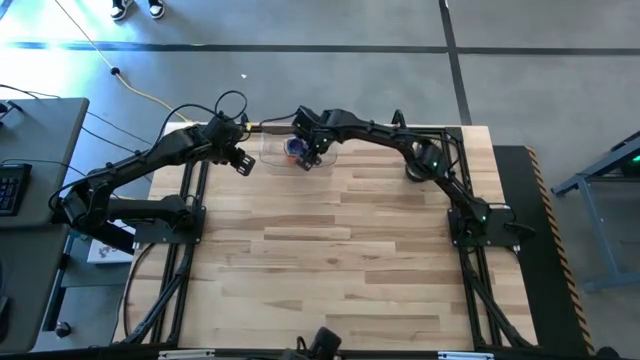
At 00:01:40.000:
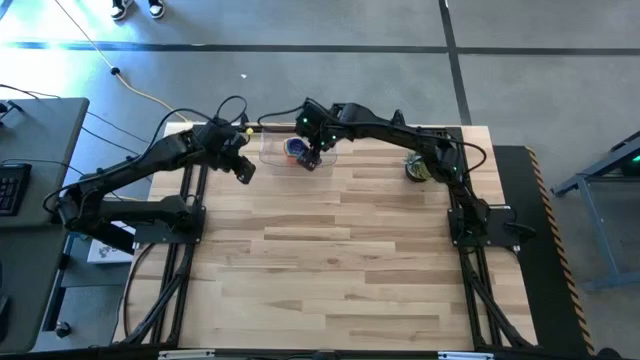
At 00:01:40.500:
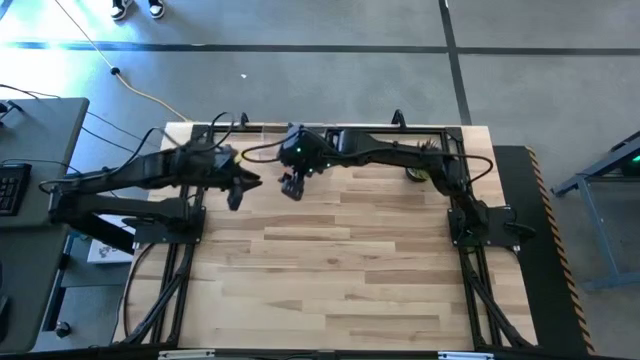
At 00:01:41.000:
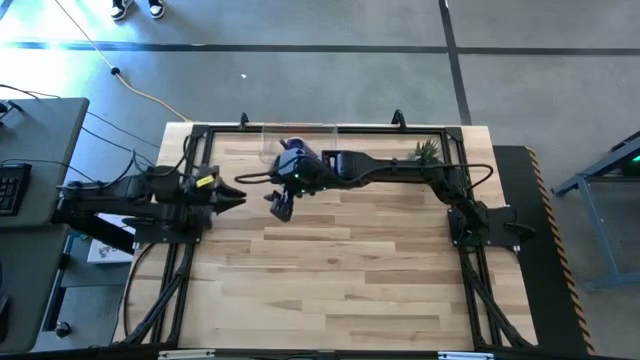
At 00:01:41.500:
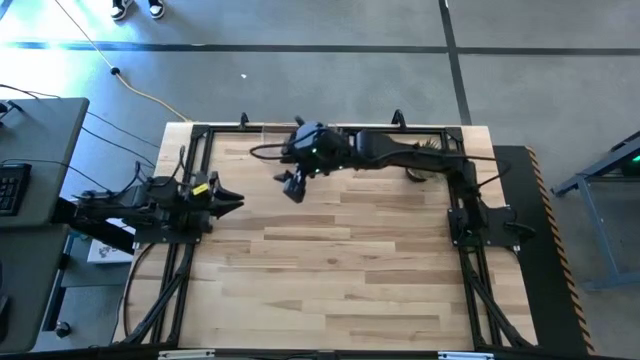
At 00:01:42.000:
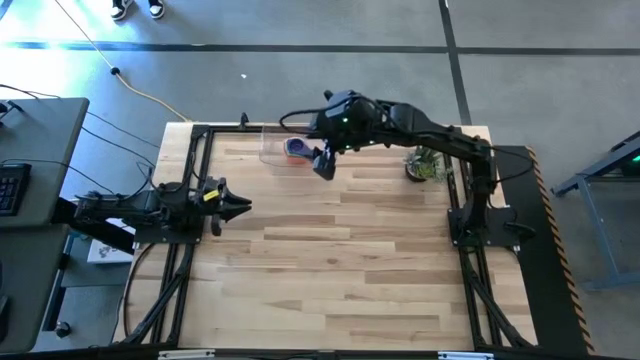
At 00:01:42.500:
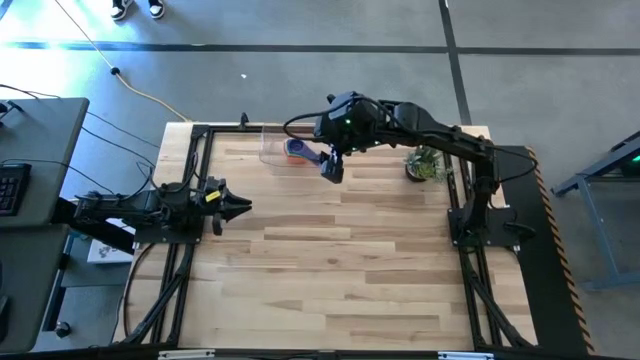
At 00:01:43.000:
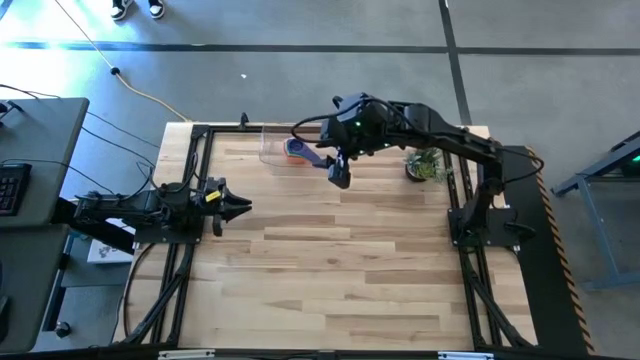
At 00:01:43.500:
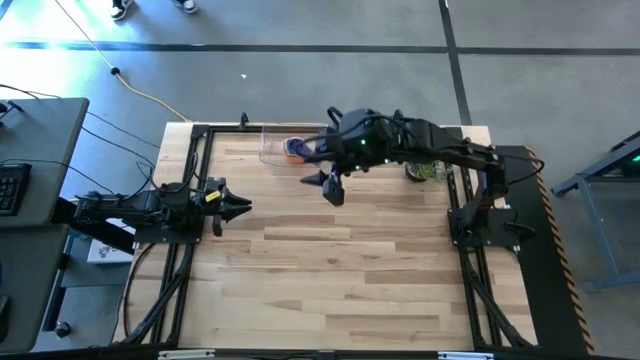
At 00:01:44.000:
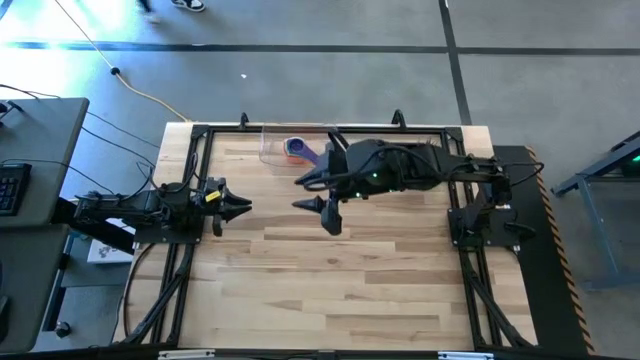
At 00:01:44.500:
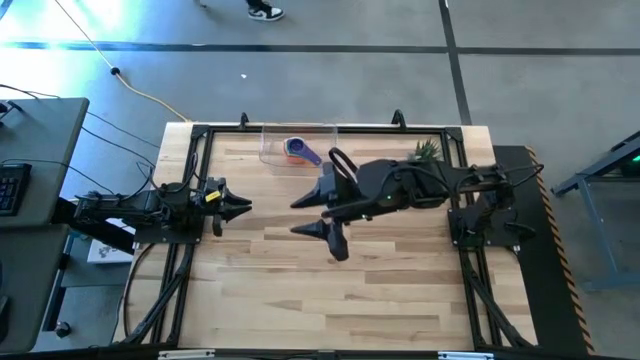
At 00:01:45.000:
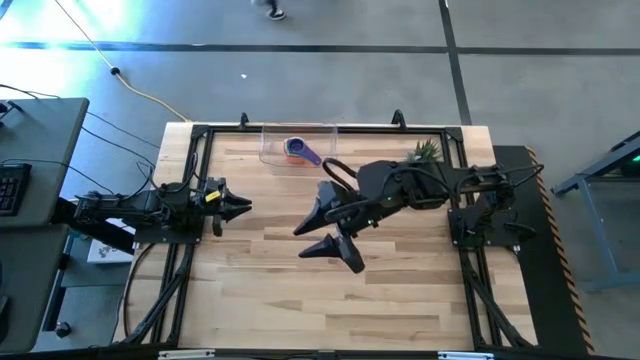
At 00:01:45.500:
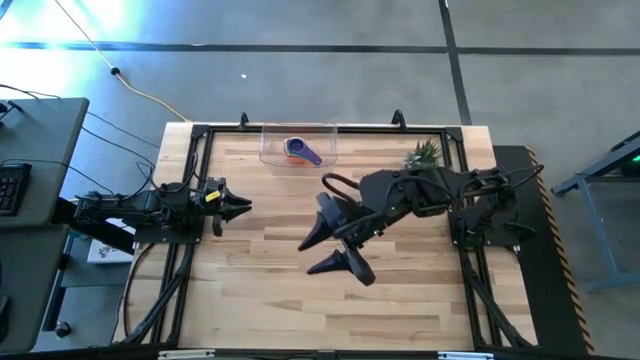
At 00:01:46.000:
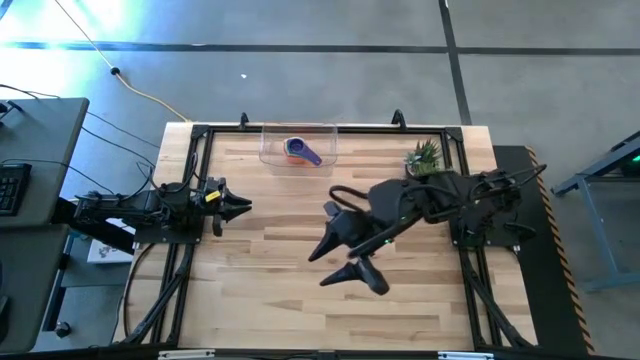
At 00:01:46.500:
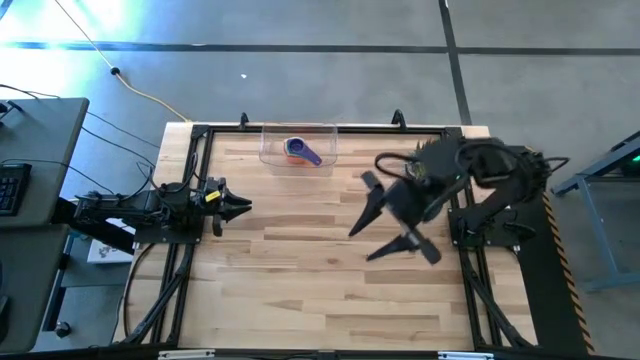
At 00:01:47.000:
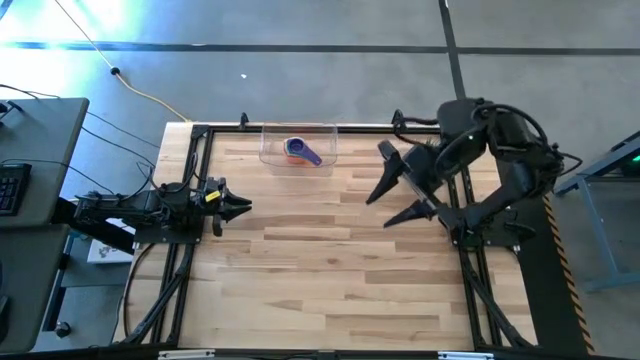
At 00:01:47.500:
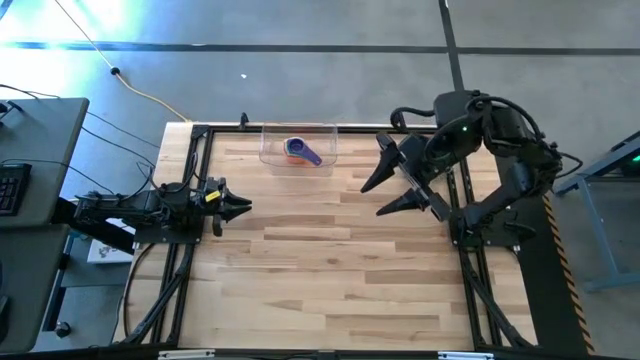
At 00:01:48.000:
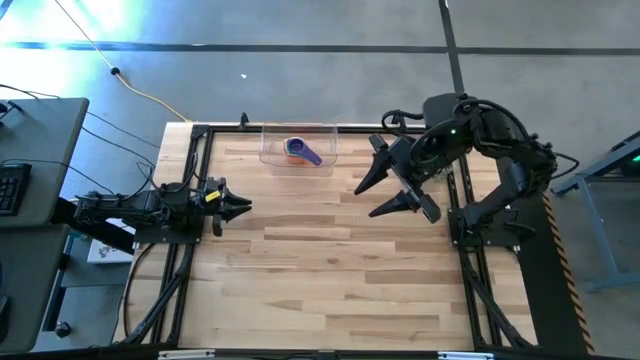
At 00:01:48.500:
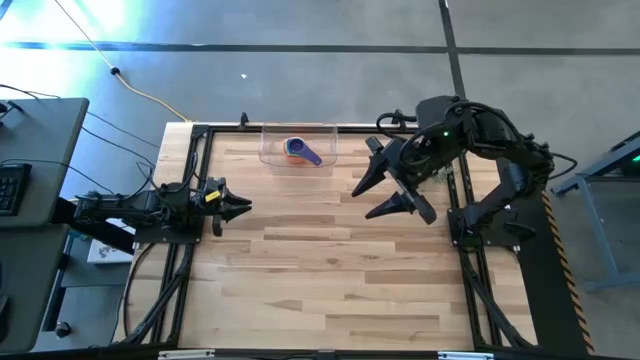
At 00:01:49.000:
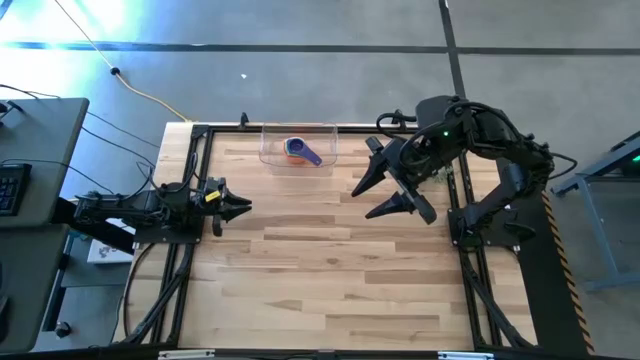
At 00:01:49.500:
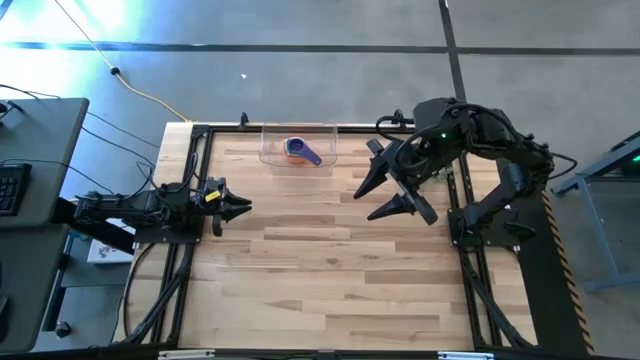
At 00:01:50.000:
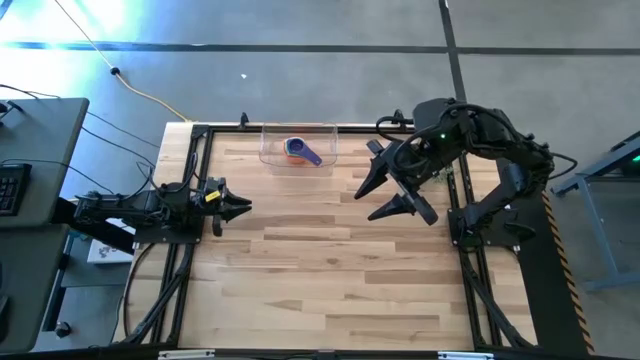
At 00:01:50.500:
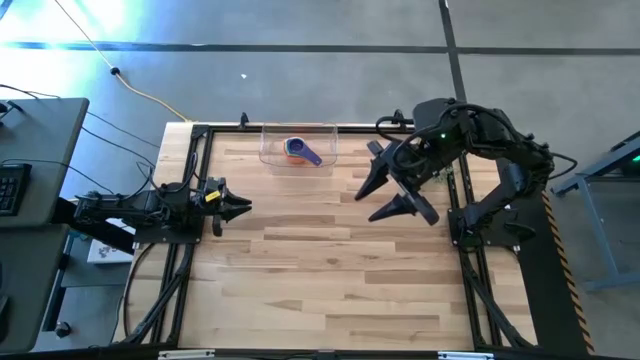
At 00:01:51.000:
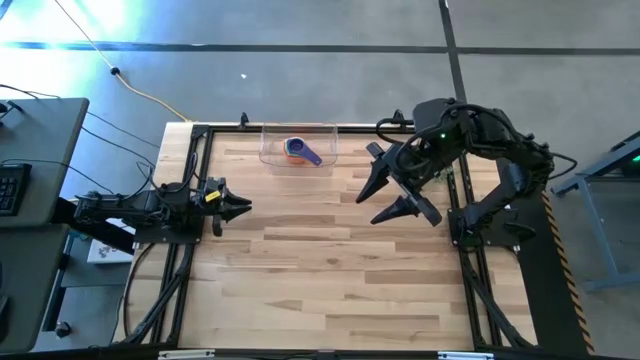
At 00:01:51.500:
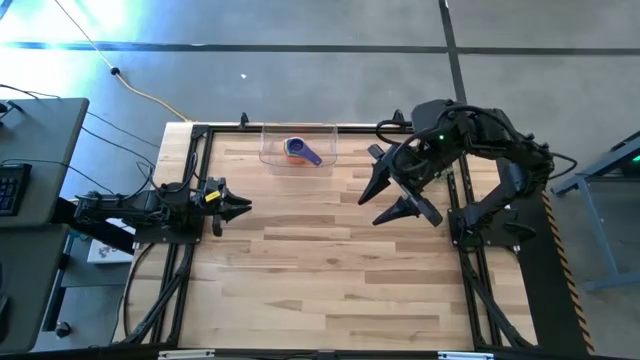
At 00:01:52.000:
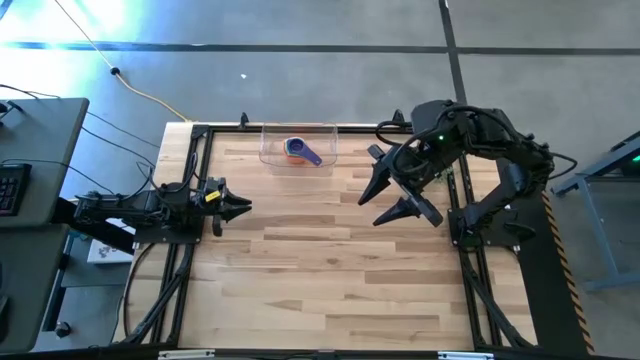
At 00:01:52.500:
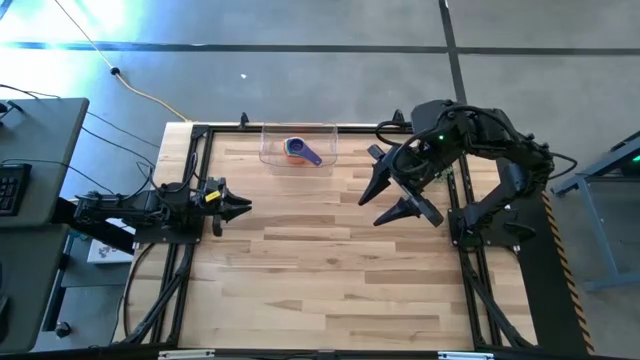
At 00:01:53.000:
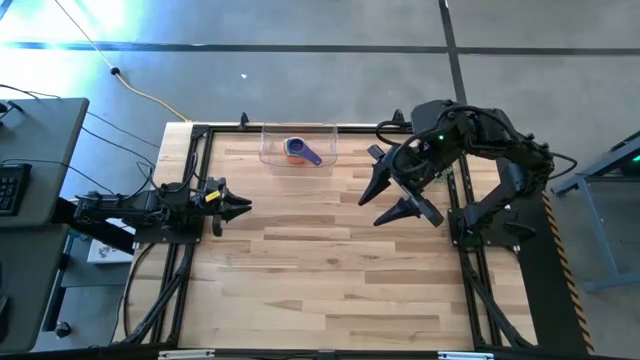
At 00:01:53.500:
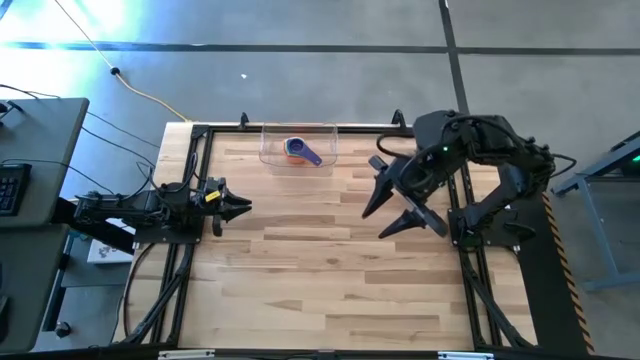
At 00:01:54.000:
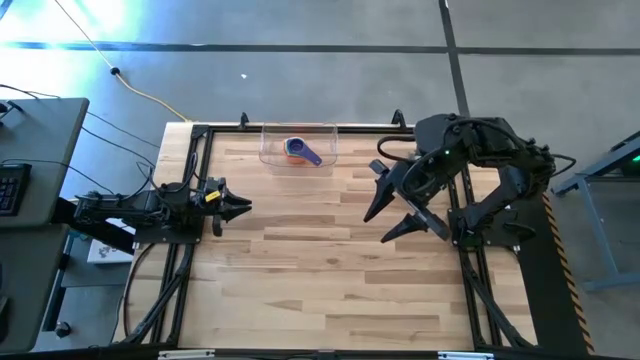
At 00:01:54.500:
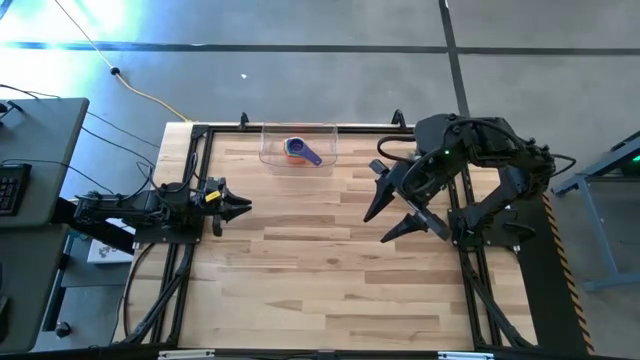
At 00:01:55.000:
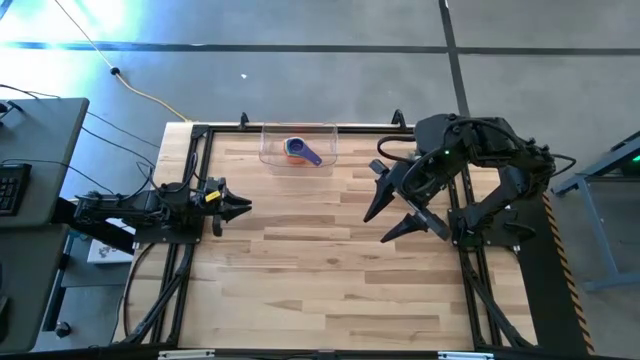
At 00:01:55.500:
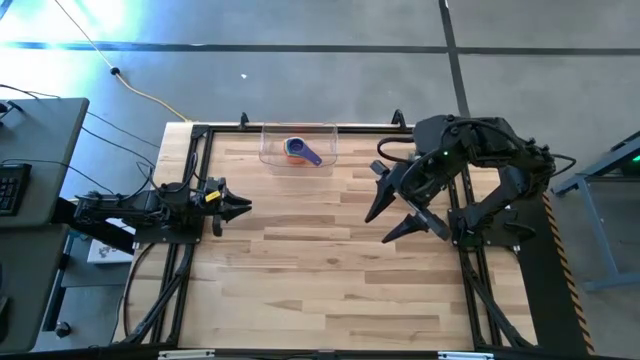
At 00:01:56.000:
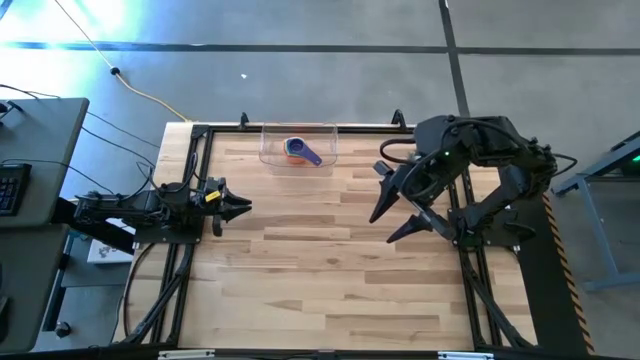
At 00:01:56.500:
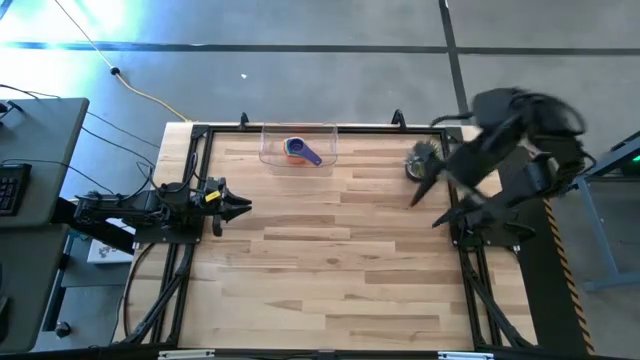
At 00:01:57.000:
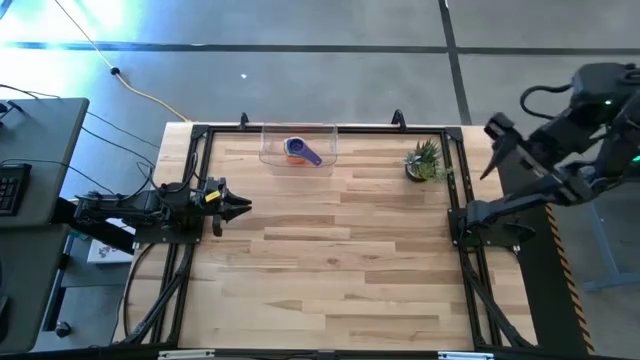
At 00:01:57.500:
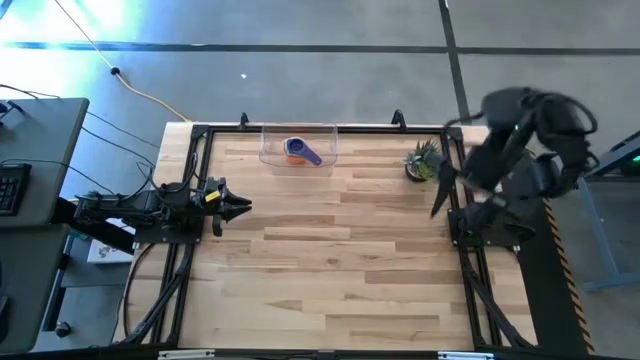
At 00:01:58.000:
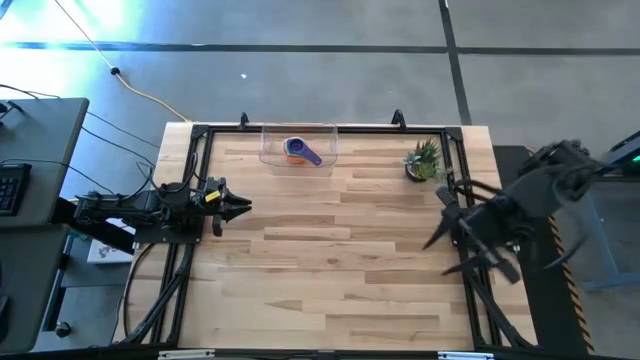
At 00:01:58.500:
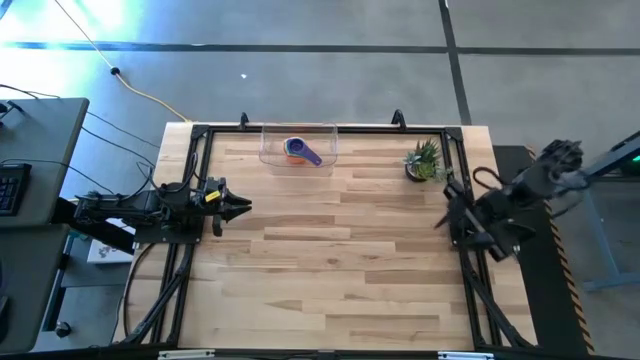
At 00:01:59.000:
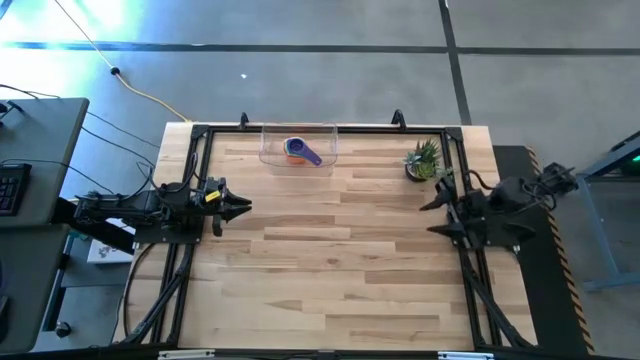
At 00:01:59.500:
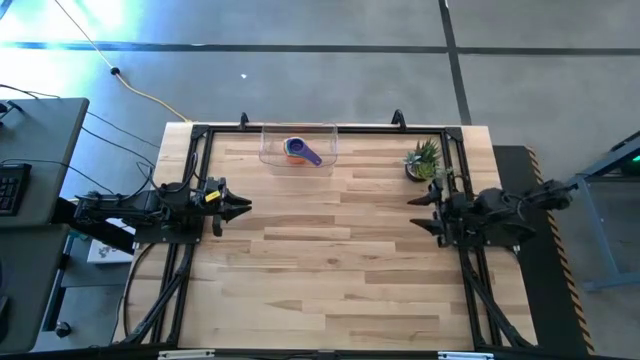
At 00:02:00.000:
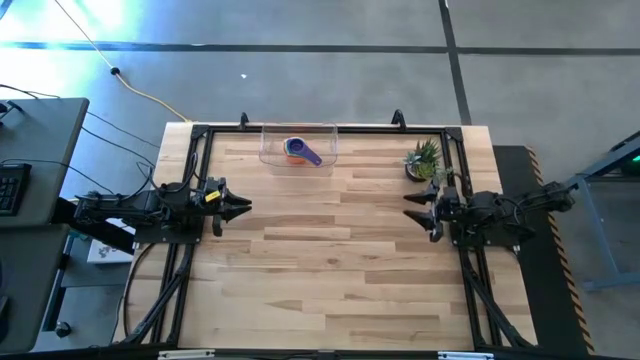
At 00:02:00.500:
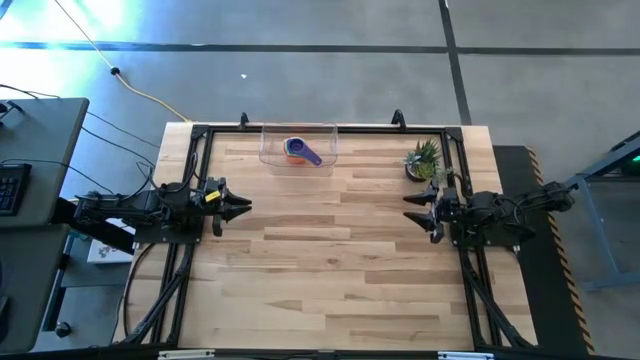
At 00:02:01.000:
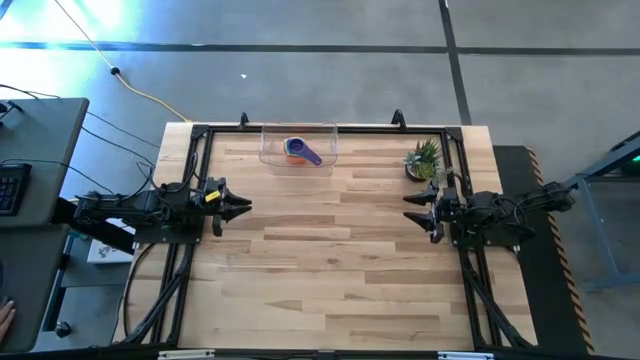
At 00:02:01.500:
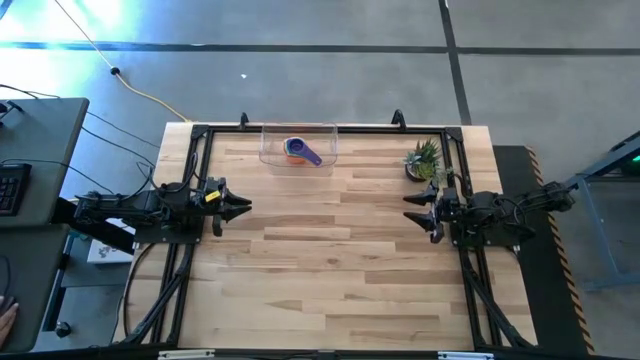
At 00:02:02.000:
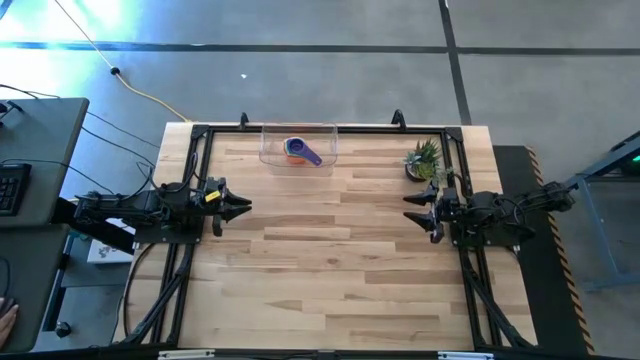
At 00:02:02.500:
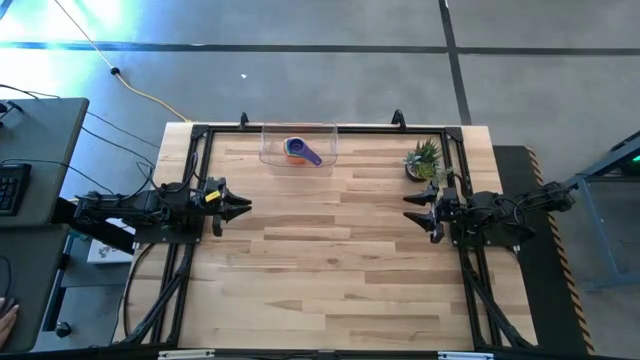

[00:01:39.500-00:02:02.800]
Task: Nest measuring cups in basket
Return to Home Position
